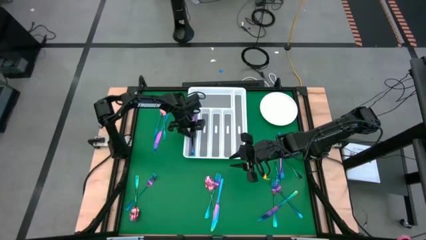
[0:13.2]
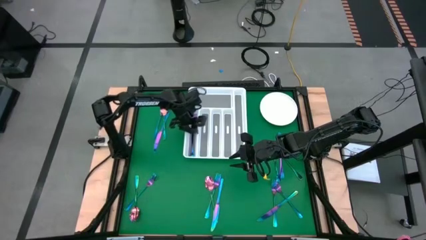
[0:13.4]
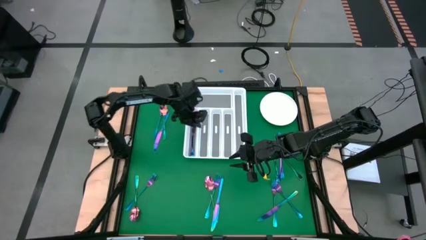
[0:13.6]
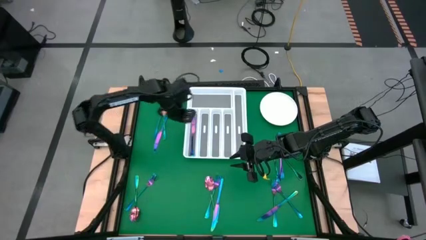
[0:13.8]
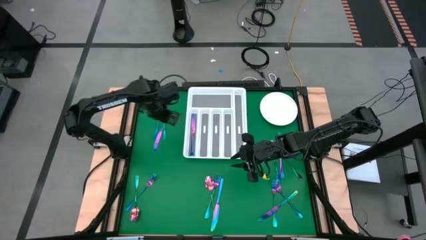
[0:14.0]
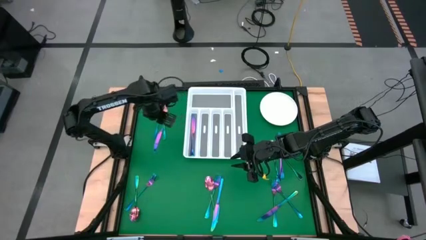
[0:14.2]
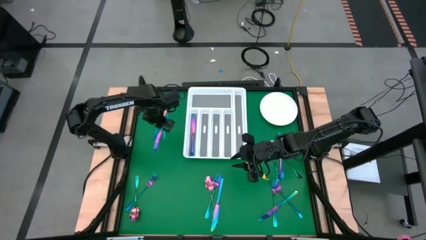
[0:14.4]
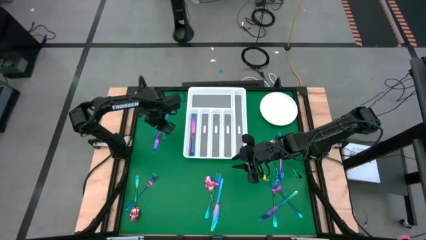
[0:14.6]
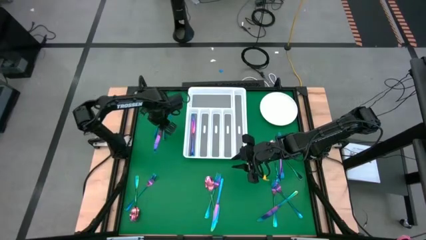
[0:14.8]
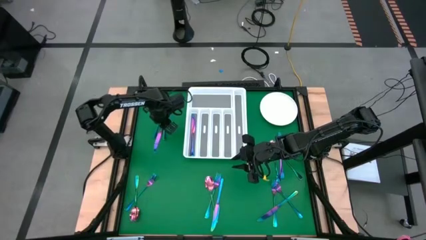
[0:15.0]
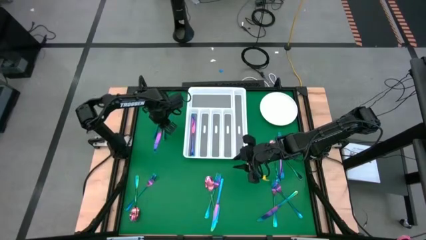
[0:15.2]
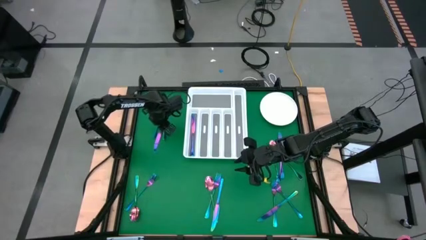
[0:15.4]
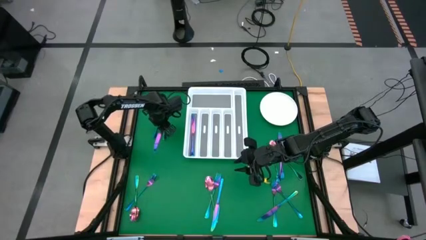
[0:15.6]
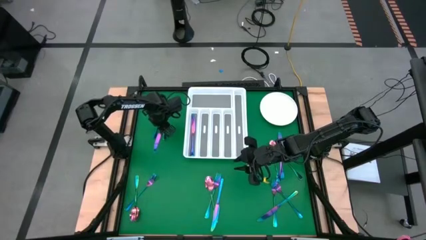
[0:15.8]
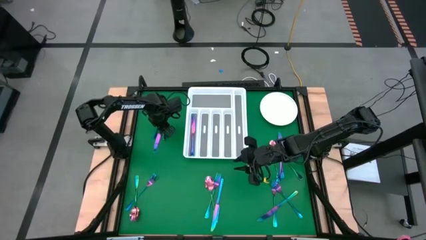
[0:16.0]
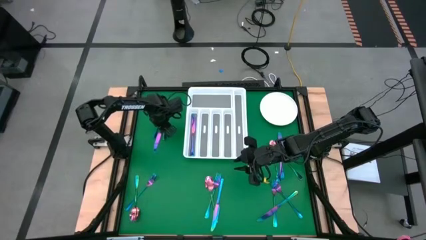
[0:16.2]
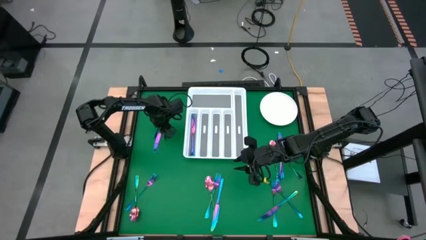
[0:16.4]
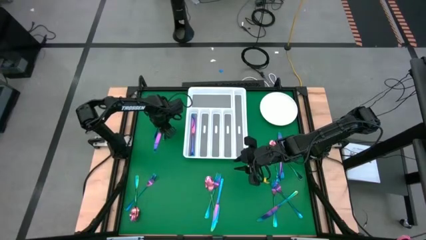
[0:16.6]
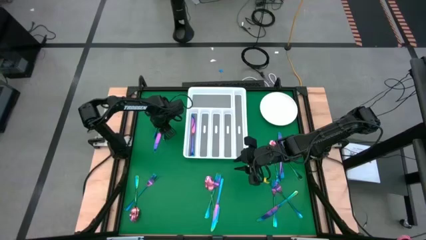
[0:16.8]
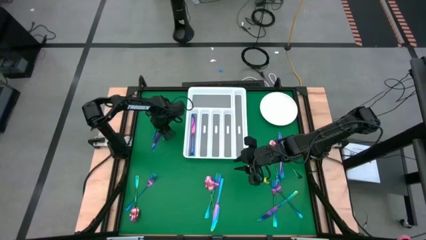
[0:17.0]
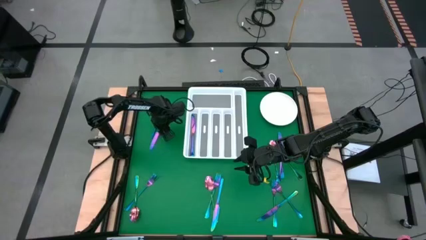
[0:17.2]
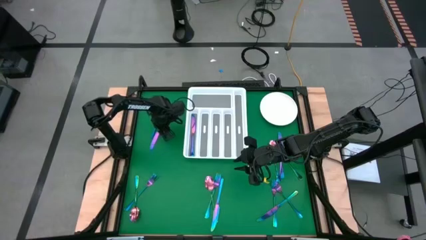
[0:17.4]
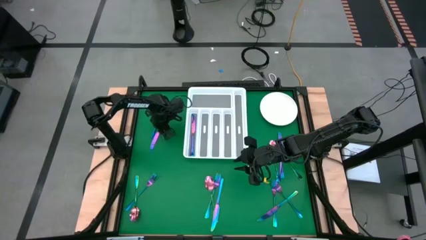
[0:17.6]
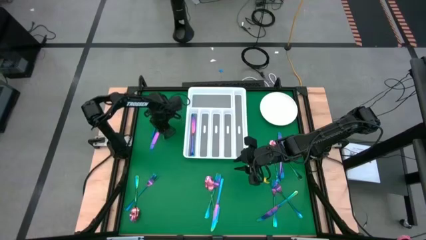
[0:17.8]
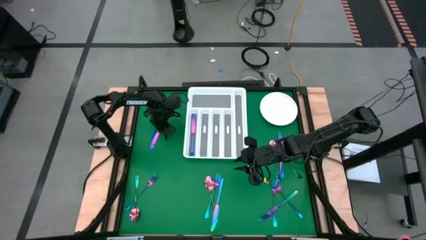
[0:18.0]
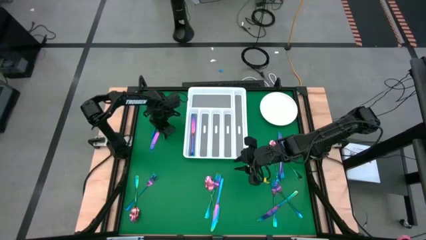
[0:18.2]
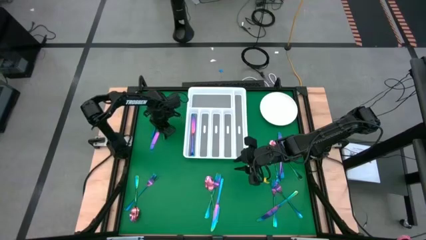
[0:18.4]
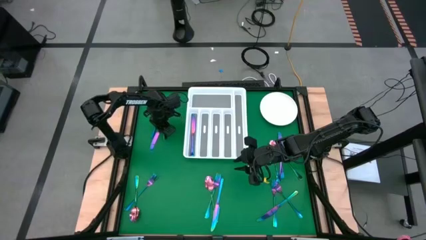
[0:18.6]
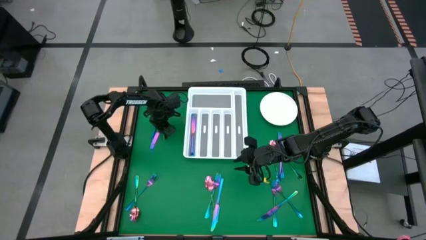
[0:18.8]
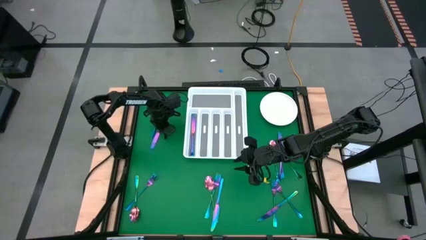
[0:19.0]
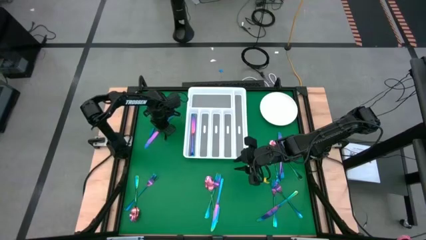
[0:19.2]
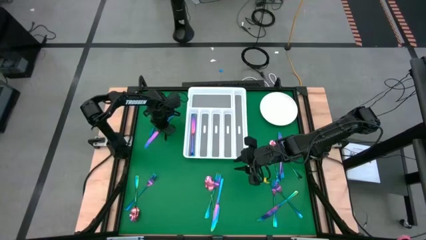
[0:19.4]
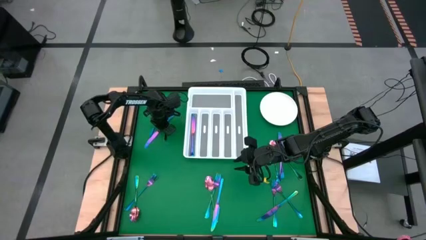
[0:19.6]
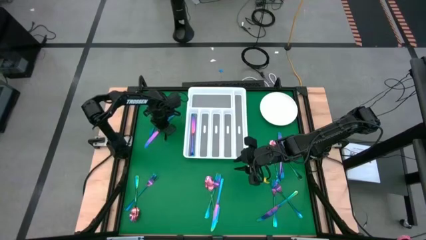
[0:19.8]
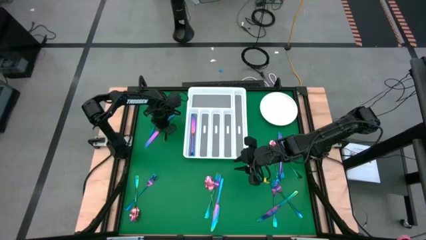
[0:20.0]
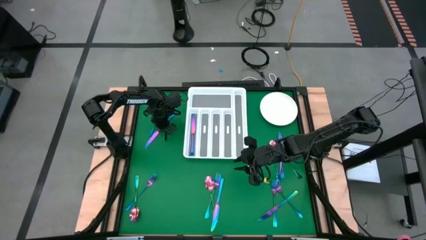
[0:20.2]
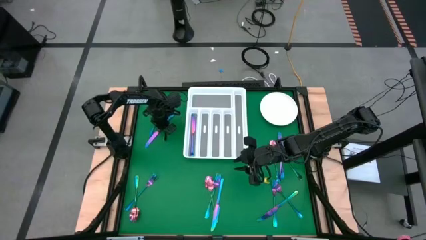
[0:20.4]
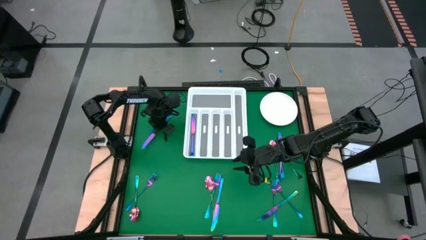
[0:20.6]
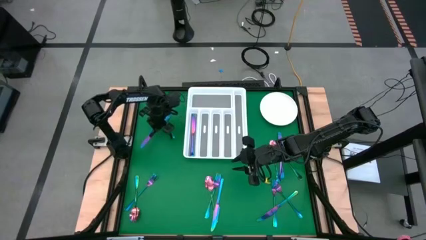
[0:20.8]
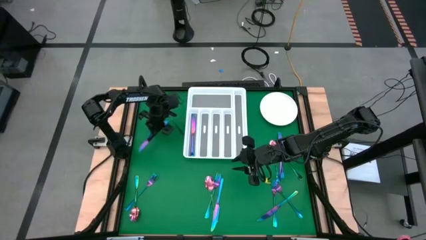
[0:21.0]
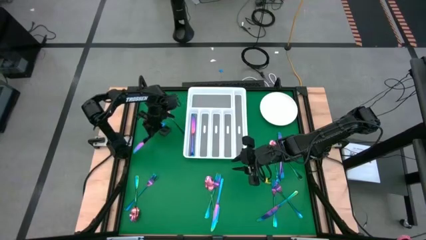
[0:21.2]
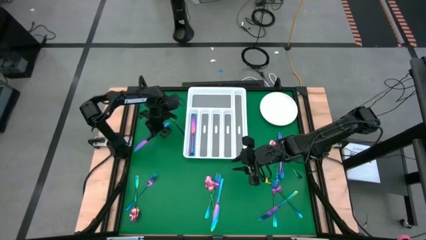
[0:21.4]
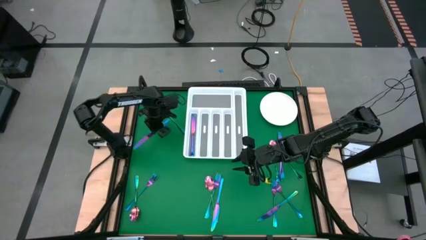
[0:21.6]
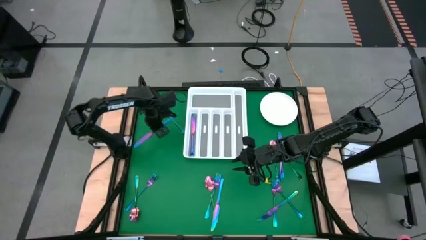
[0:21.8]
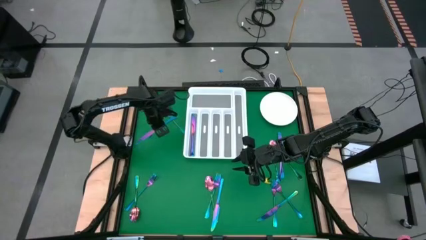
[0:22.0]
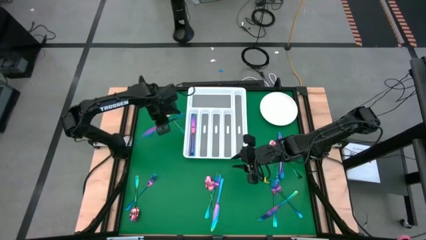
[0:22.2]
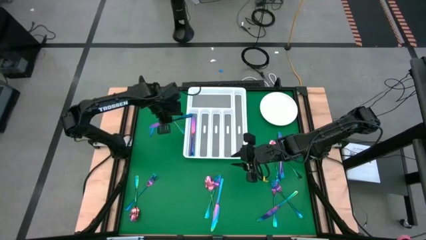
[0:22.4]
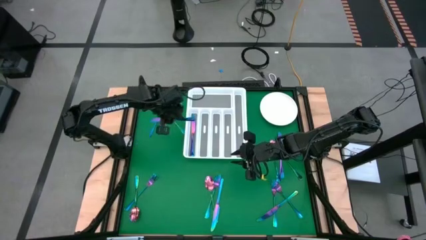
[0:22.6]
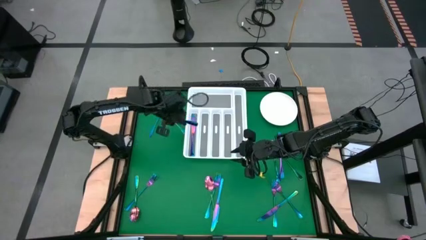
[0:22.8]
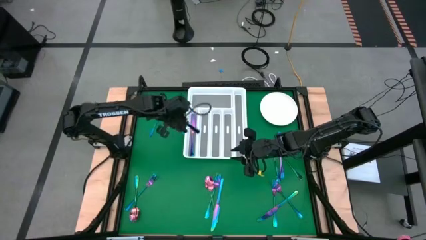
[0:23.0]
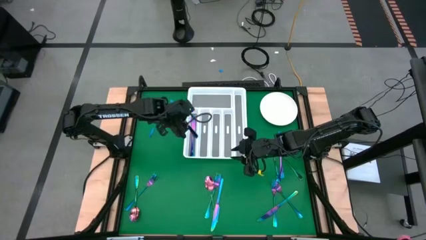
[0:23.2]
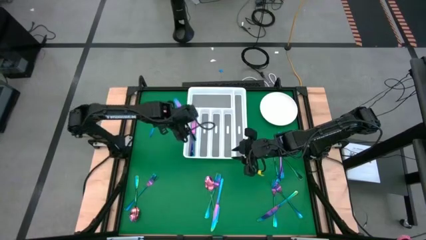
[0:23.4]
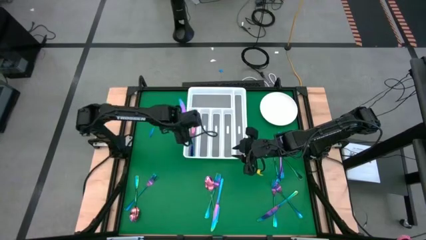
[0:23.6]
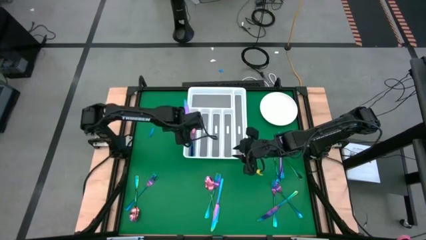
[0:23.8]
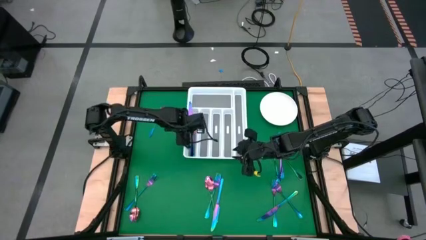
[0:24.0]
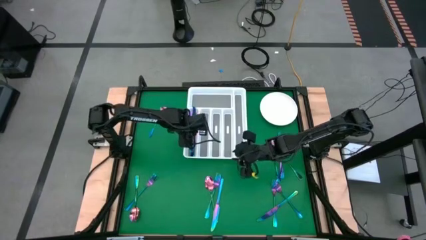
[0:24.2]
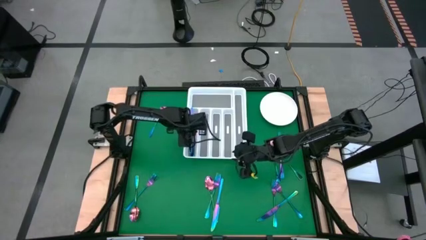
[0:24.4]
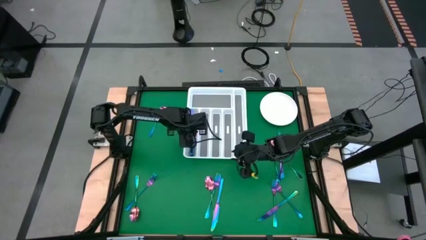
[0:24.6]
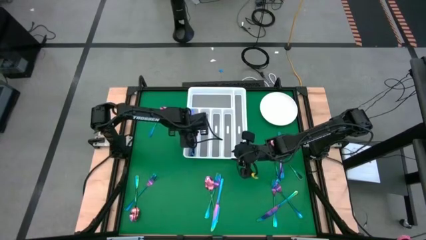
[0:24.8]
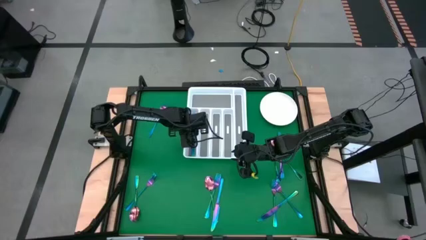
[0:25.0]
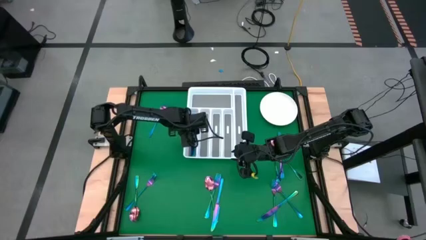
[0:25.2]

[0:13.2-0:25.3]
Task: Sort silverware
Put the blue table knife into the silverware tray
